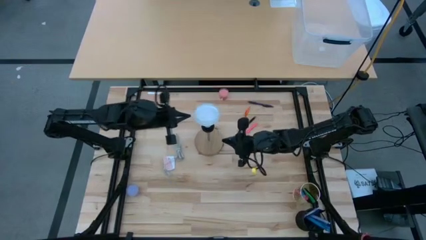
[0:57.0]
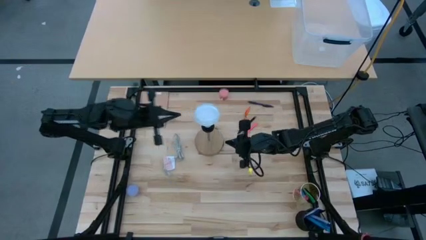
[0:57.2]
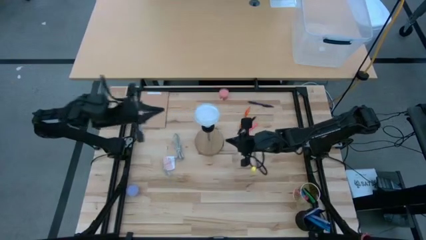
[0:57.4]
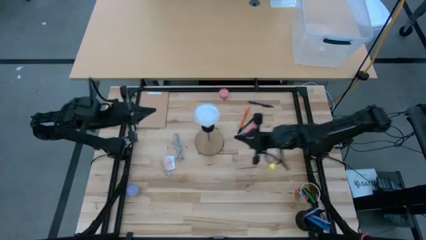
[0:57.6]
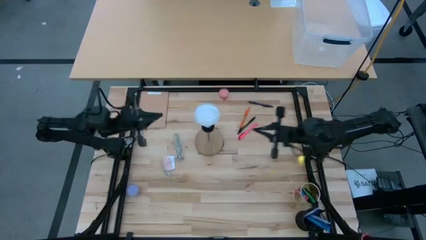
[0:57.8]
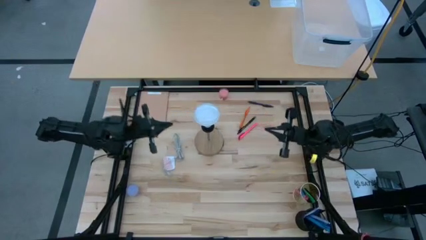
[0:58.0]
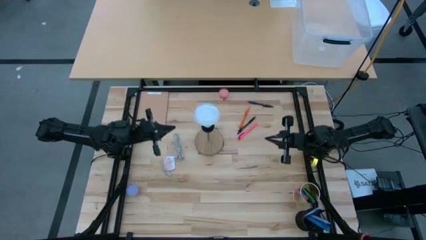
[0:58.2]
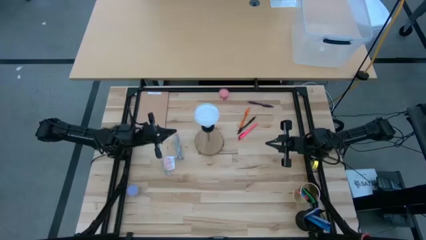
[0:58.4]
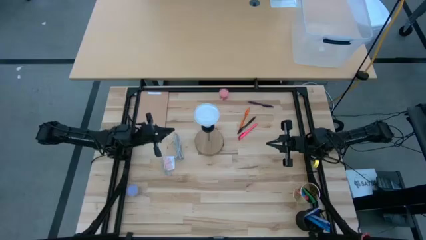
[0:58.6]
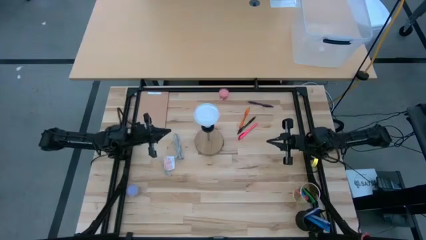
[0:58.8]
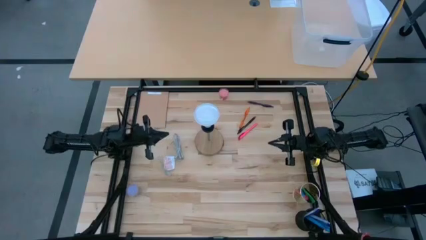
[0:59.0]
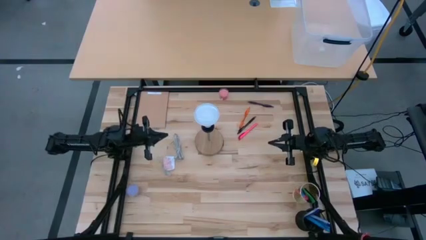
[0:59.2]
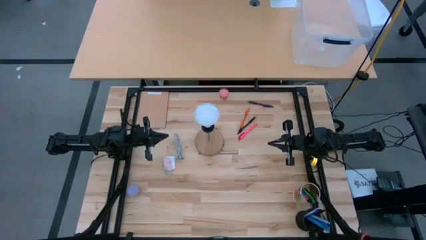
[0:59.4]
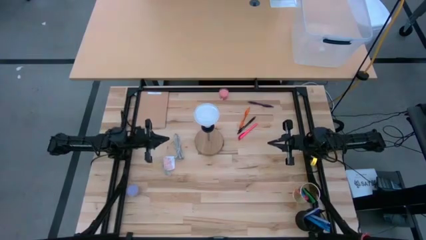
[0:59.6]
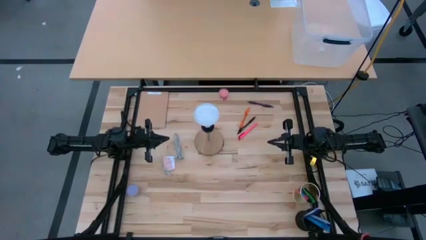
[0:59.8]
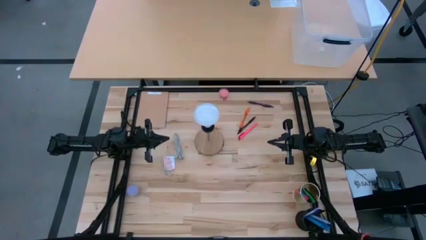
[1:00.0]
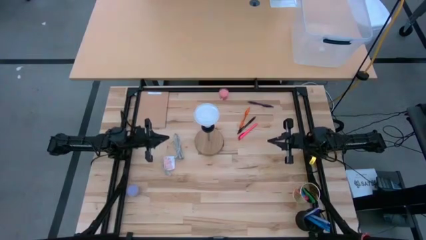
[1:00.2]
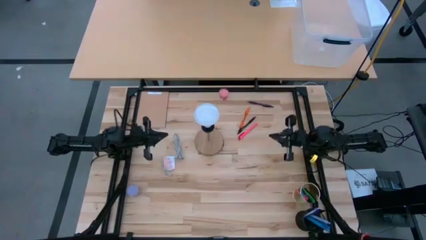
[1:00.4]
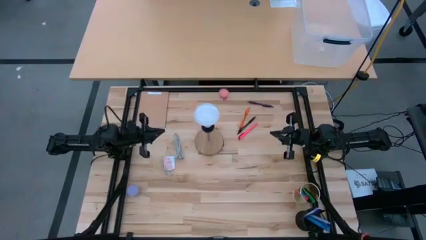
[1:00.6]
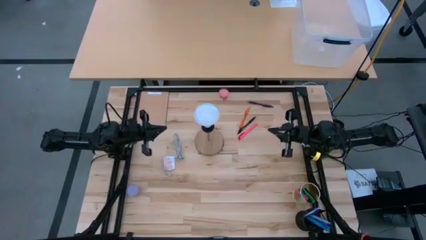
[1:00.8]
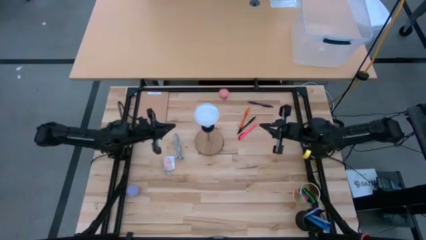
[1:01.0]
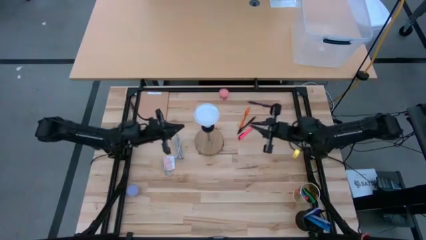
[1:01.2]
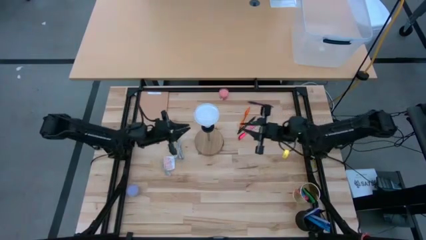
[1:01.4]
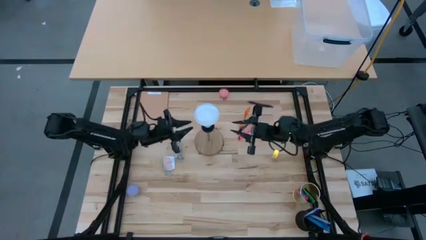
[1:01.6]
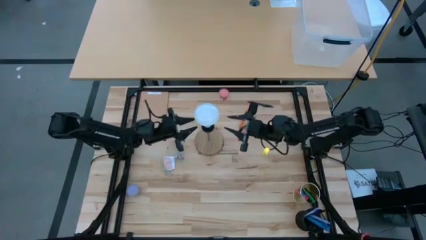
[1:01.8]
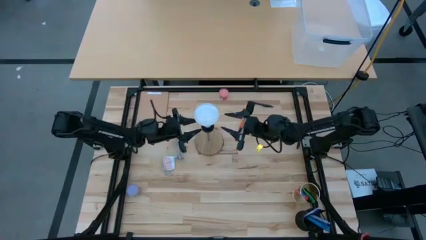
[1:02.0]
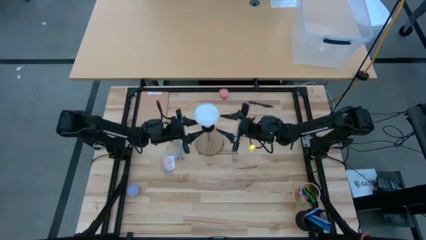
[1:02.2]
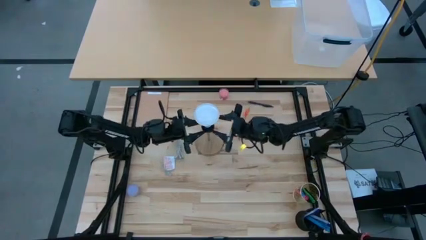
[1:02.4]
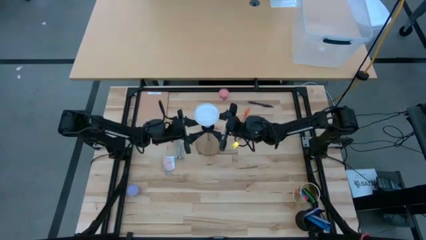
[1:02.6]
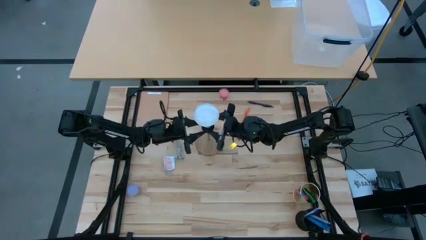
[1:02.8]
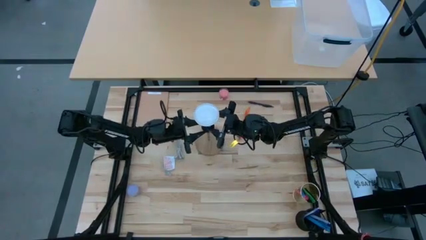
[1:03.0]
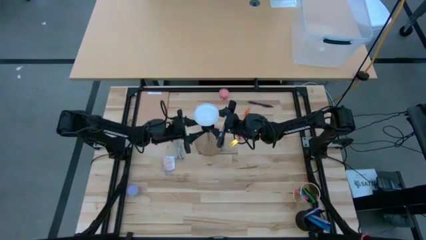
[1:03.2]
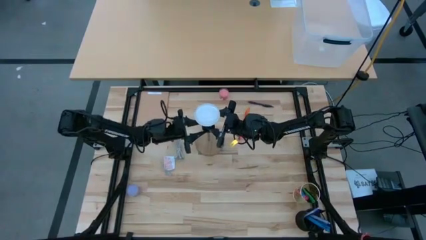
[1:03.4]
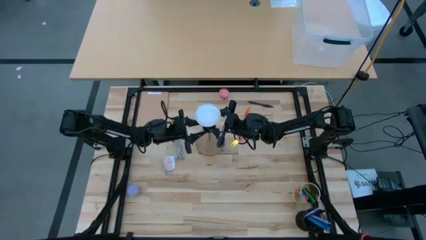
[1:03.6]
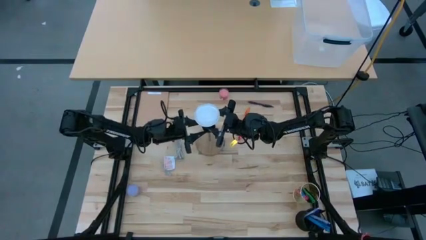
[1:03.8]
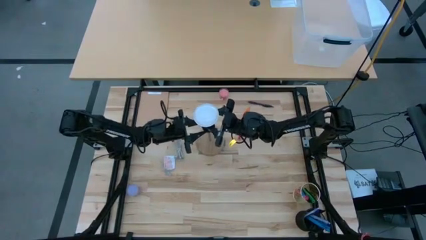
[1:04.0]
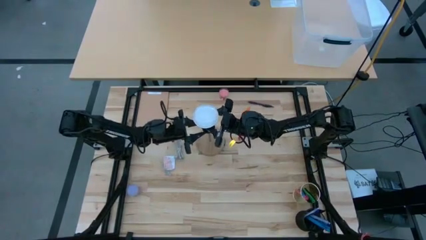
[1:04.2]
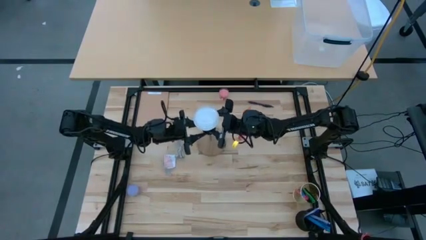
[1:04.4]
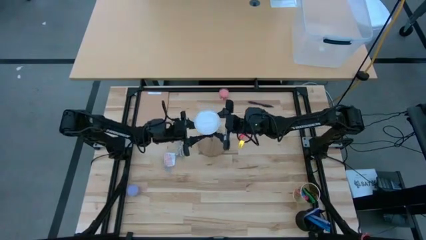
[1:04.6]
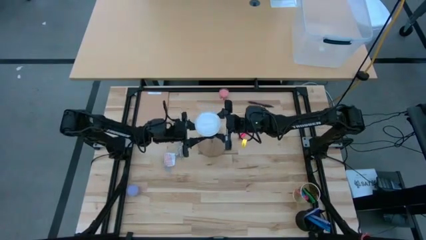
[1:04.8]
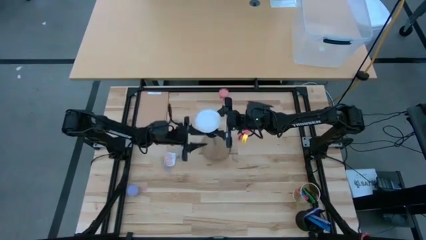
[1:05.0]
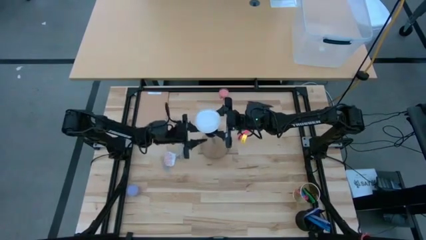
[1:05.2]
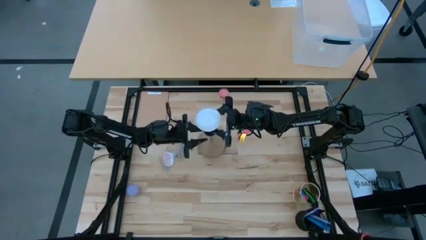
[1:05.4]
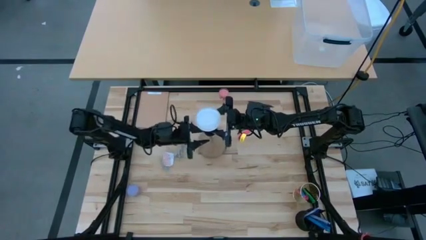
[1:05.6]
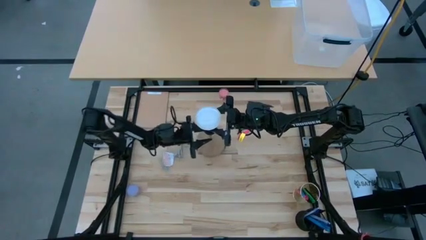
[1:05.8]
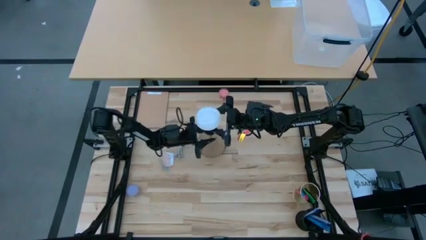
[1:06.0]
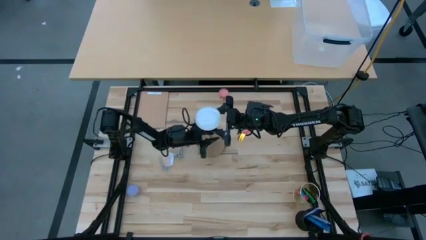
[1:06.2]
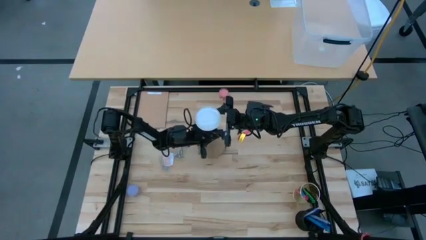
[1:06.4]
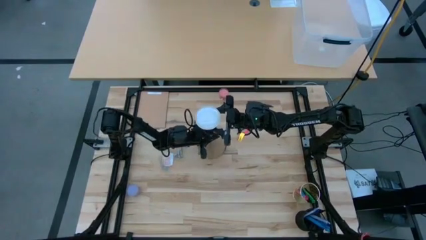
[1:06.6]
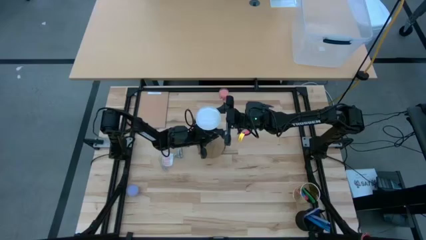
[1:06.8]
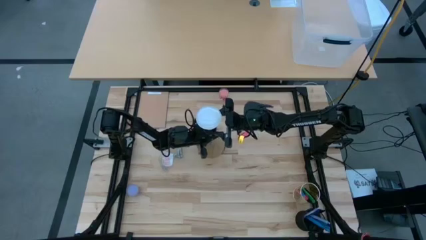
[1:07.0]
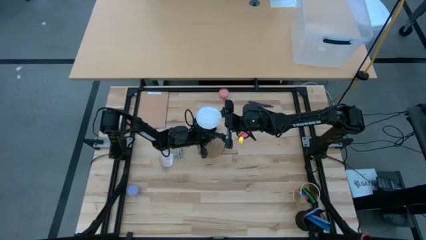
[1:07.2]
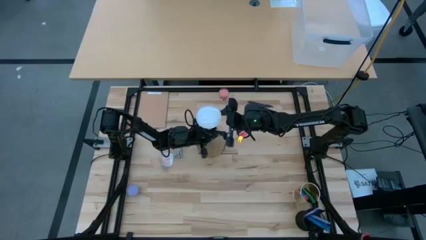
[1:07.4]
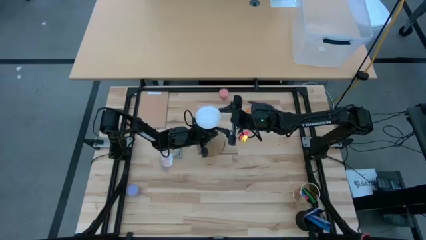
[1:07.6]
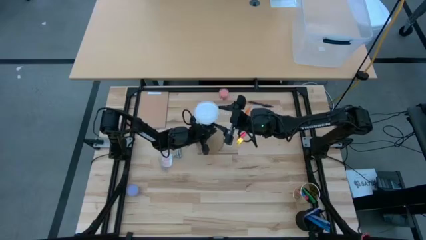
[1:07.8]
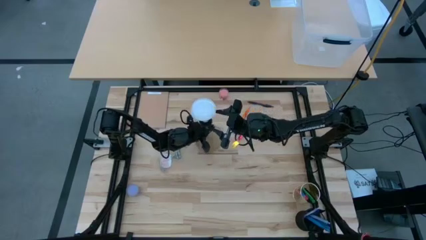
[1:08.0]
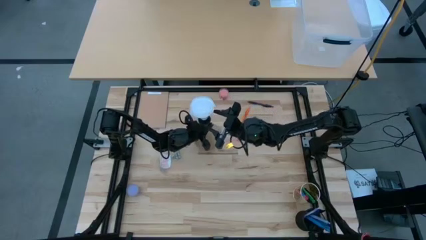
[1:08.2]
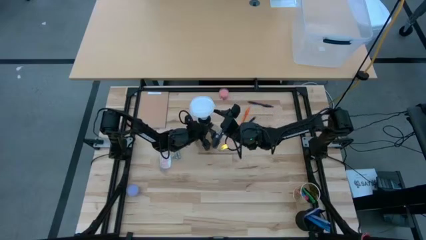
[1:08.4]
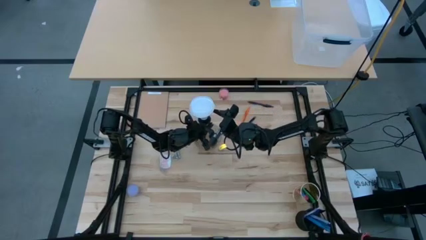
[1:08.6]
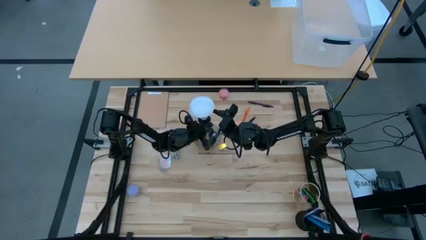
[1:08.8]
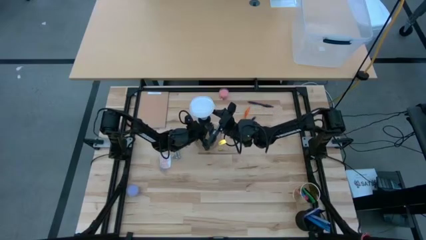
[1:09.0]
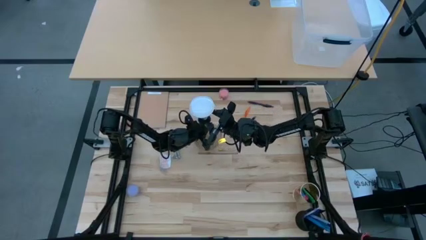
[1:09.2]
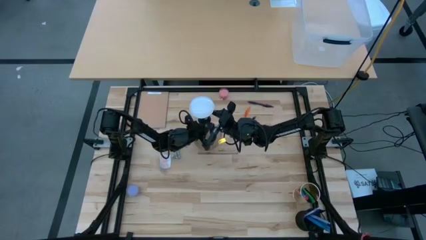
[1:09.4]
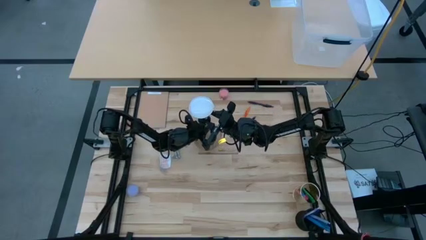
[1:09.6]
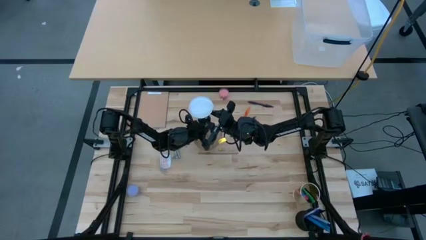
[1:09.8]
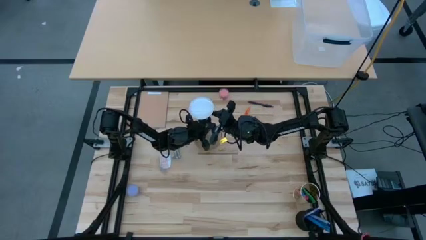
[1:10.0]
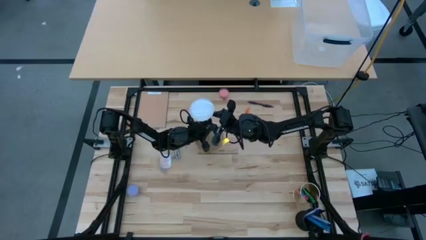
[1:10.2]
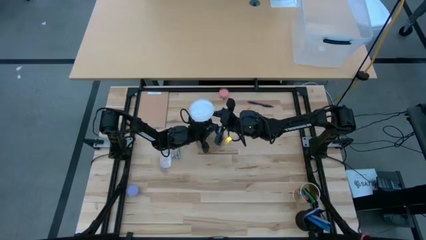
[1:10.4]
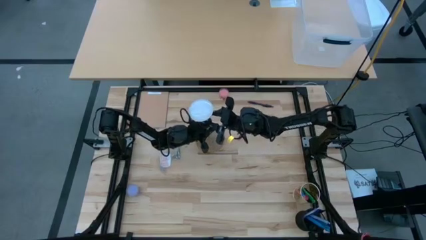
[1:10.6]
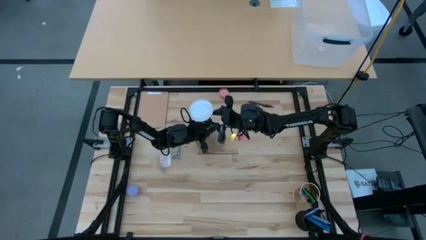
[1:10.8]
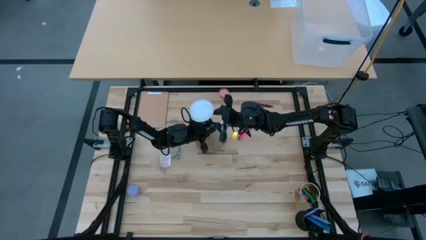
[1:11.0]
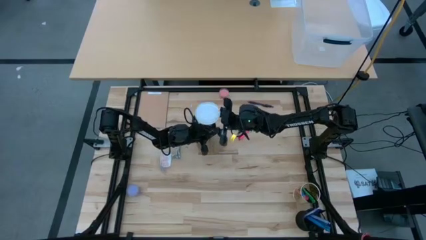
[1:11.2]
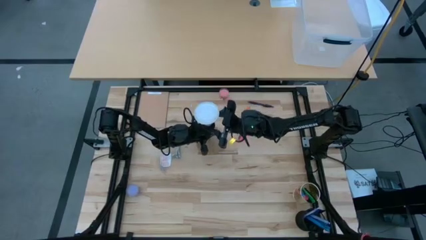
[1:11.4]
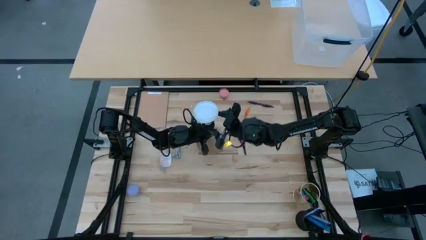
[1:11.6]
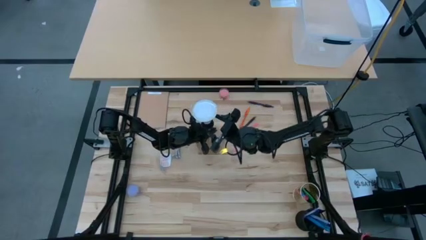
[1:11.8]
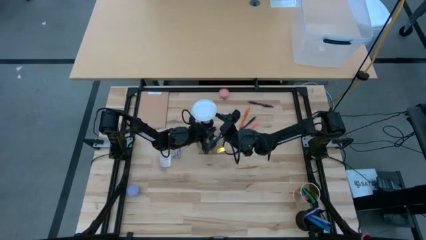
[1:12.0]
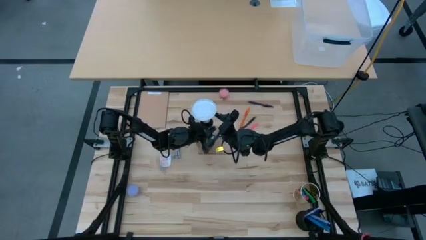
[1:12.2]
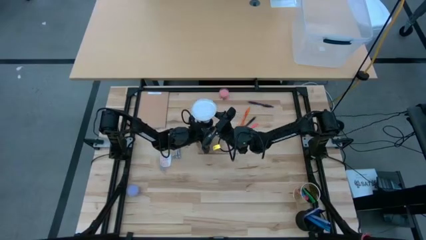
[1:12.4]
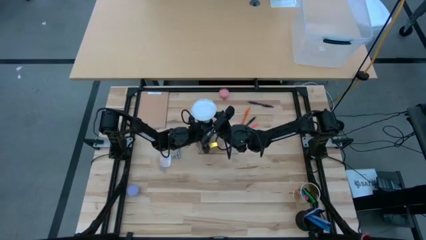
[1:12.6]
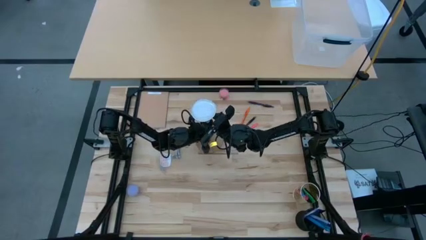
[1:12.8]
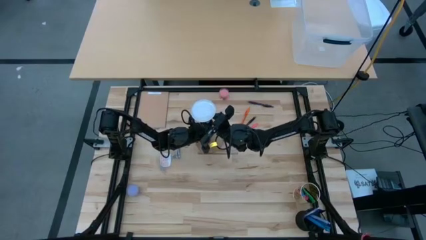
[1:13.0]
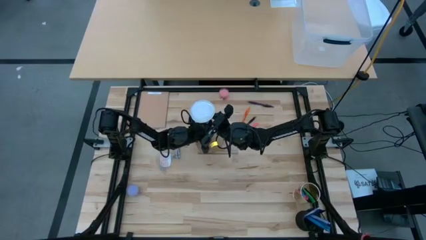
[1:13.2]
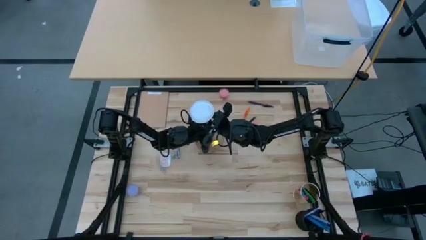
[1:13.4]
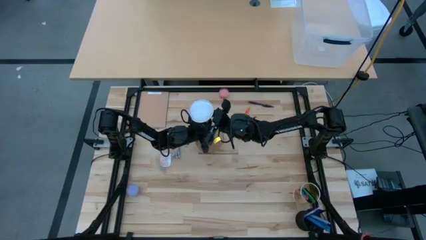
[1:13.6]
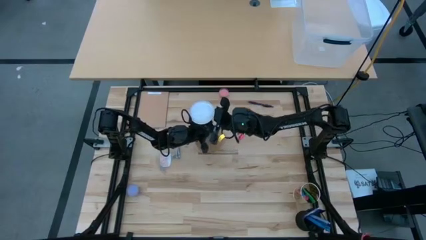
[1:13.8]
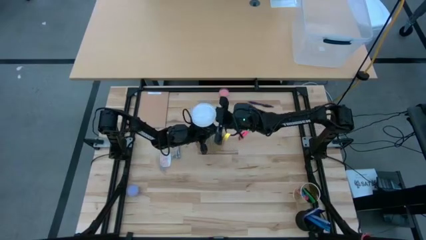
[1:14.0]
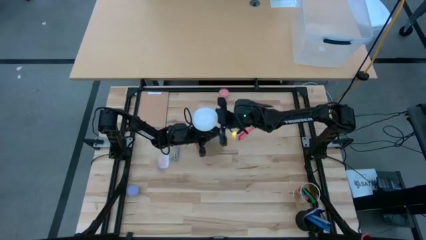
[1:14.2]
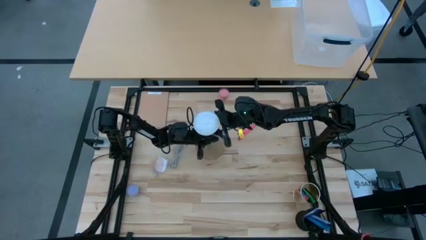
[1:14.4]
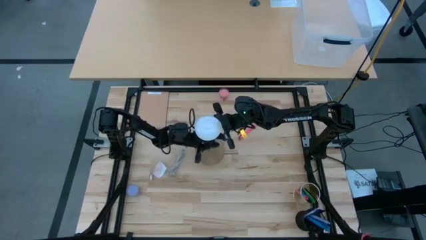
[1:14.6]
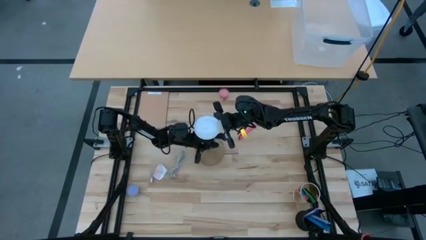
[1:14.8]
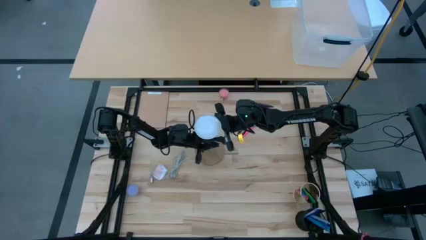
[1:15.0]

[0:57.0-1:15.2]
Task: Screw lightbulb
Remove the white lightbulb from the desk lamp
